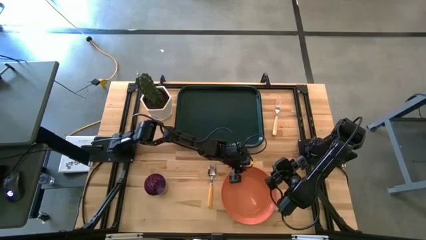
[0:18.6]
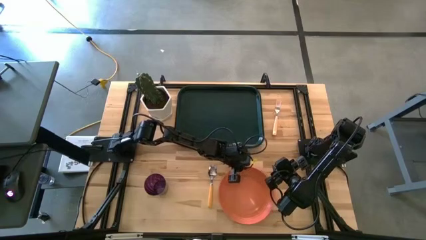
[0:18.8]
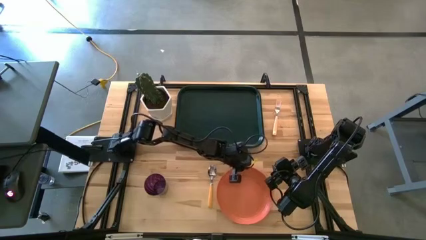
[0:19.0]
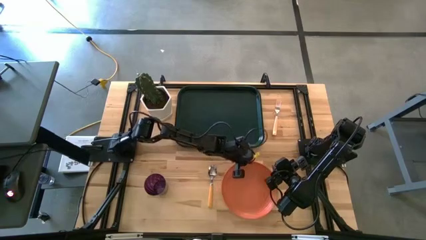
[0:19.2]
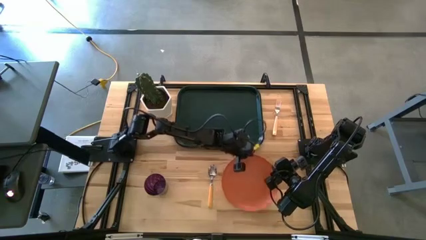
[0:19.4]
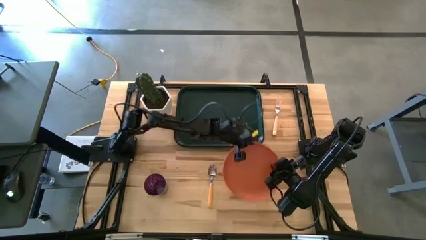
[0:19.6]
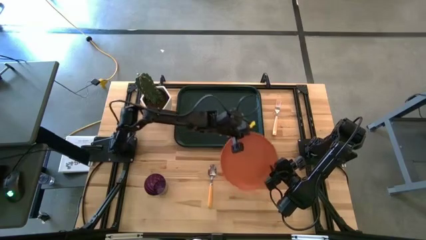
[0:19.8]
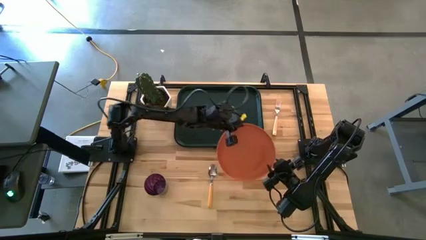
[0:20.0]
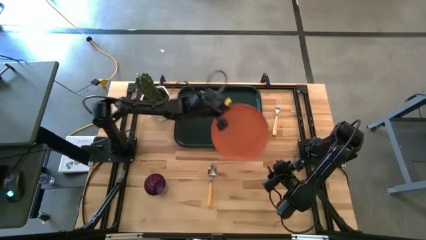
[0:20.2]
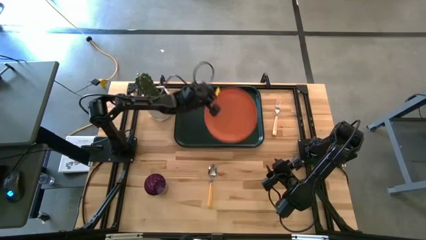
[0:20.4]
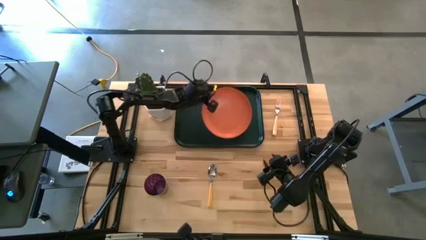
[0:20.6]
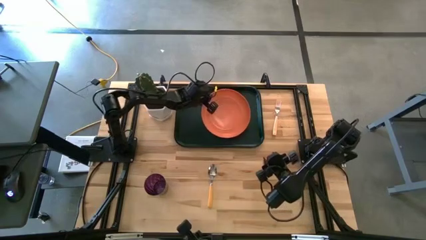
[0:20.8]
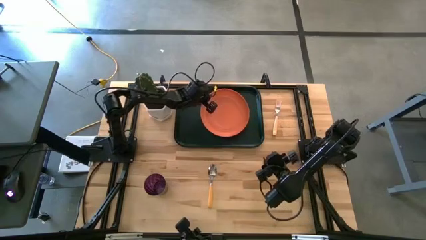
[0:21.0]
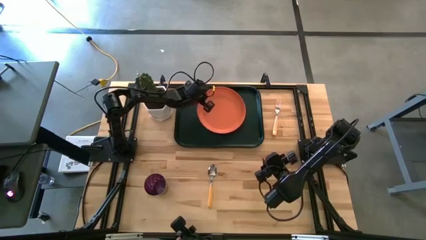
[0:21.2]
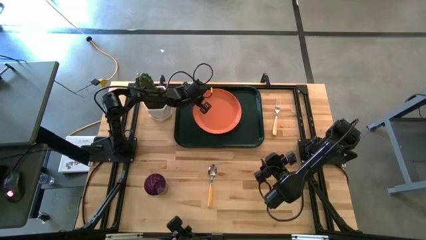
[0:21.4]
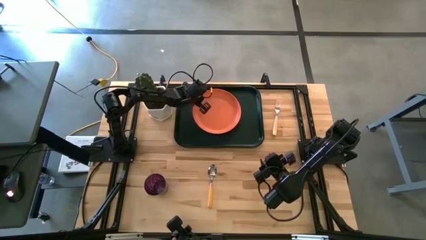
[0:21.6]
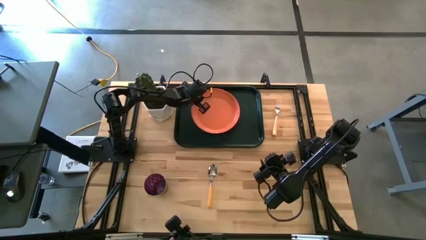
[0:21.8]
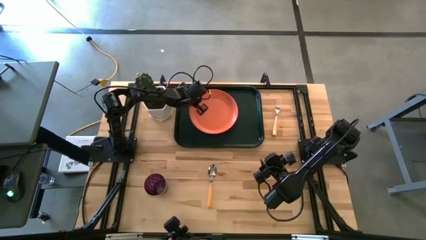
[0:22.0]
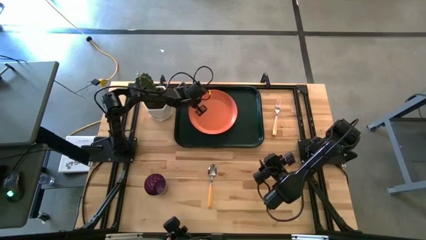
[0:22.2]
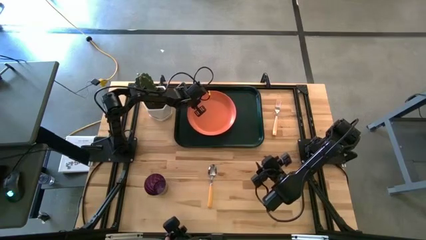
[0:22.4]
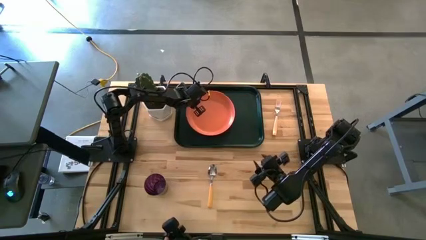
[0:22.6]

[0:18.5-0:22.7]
Task: Pick and place plate/cup/fork/spoon on tray
Put the orange plate on the dark green tray

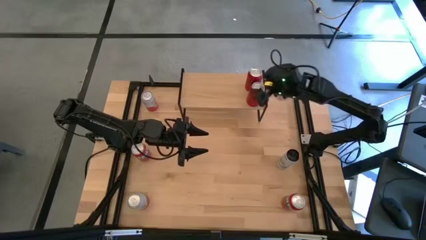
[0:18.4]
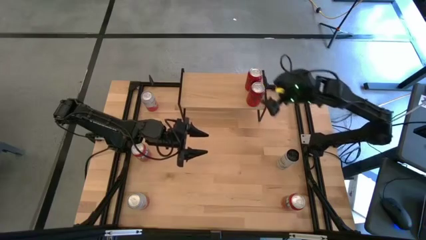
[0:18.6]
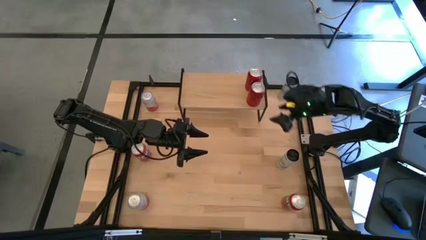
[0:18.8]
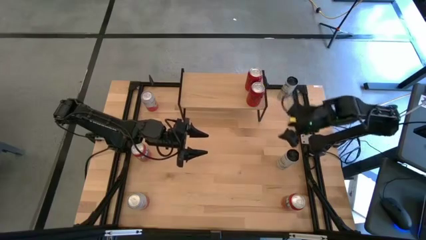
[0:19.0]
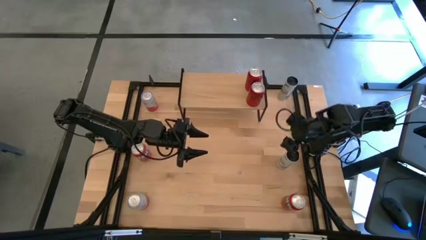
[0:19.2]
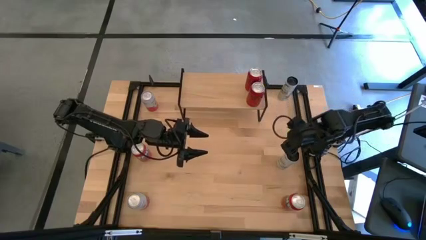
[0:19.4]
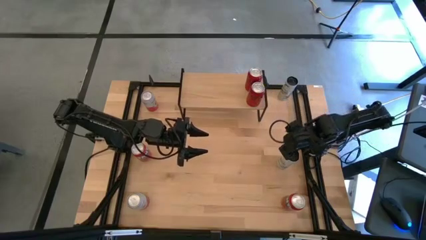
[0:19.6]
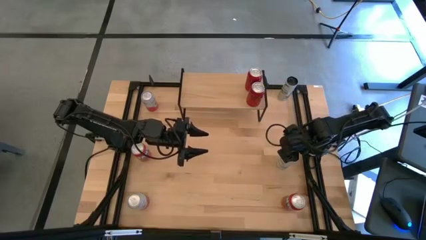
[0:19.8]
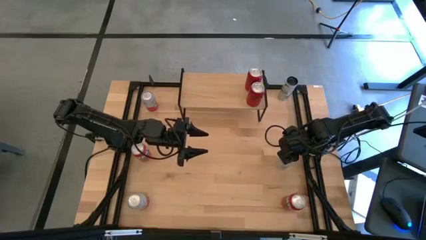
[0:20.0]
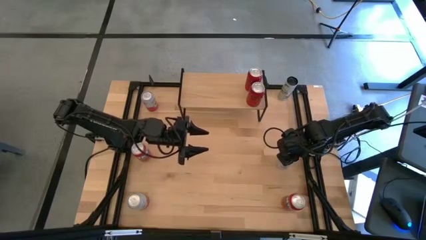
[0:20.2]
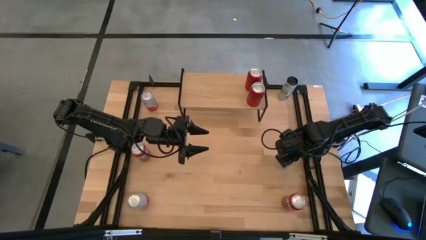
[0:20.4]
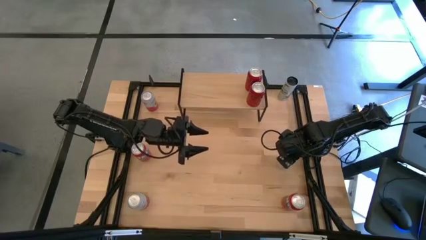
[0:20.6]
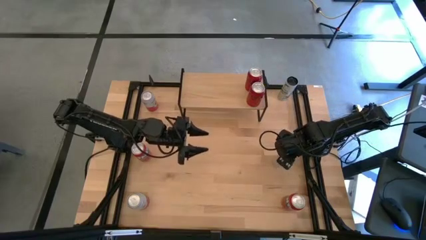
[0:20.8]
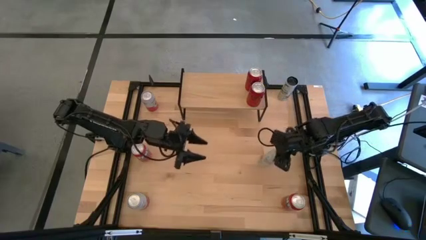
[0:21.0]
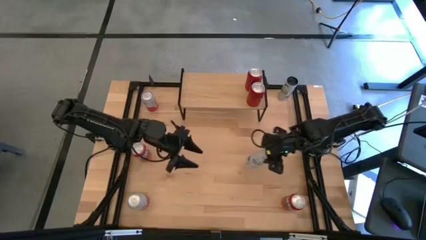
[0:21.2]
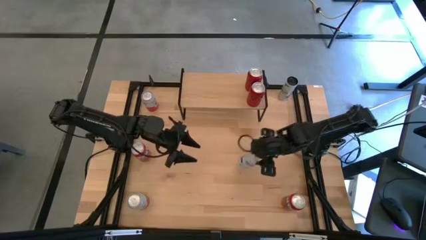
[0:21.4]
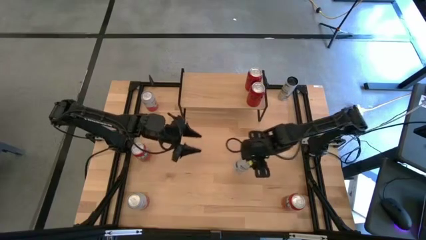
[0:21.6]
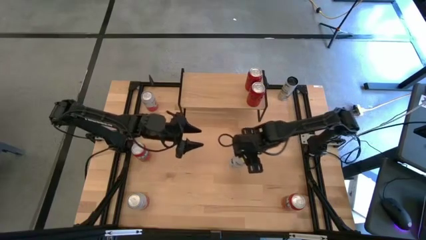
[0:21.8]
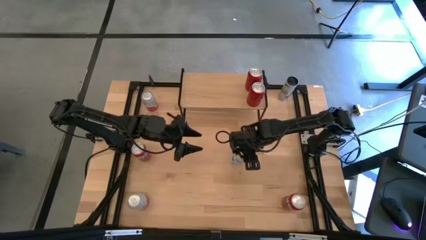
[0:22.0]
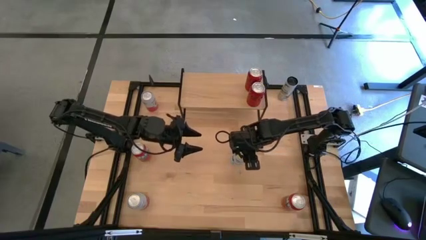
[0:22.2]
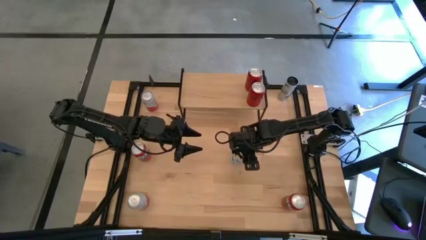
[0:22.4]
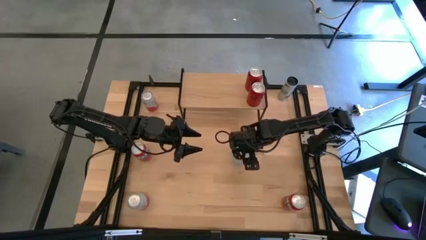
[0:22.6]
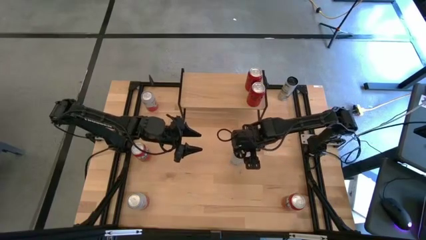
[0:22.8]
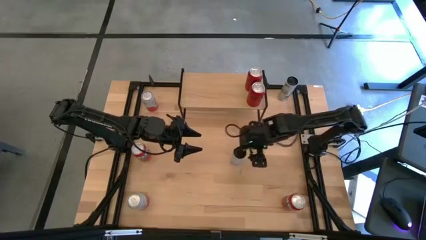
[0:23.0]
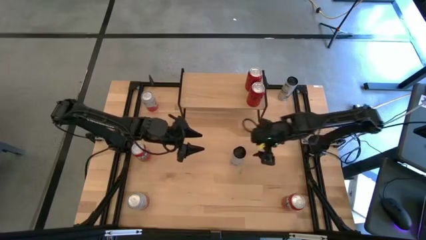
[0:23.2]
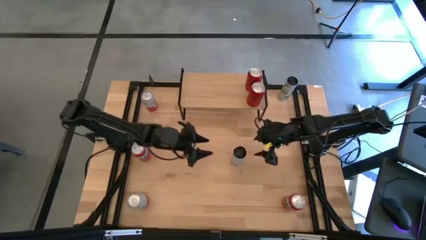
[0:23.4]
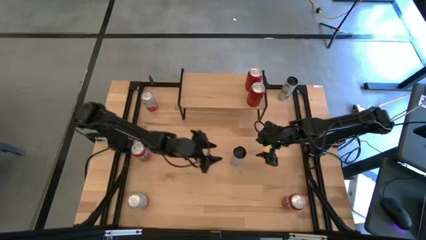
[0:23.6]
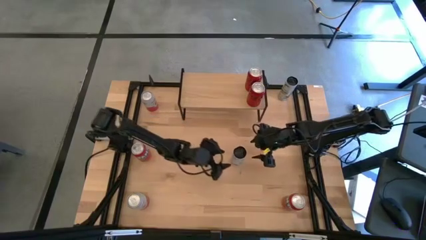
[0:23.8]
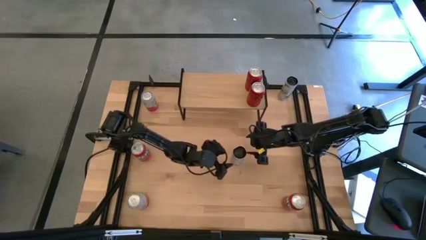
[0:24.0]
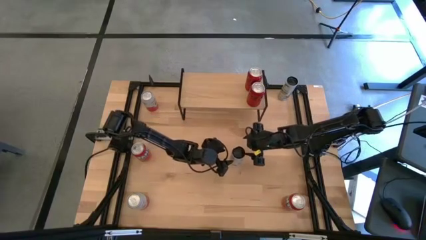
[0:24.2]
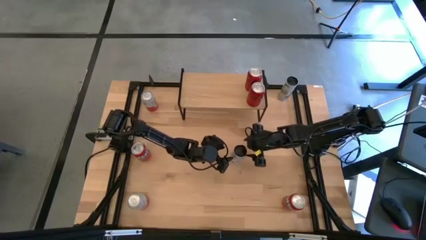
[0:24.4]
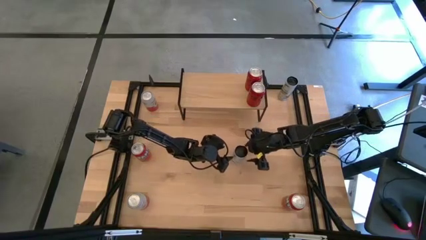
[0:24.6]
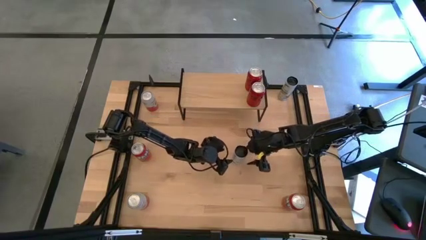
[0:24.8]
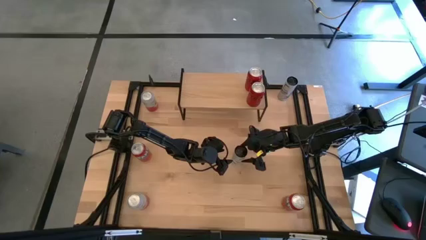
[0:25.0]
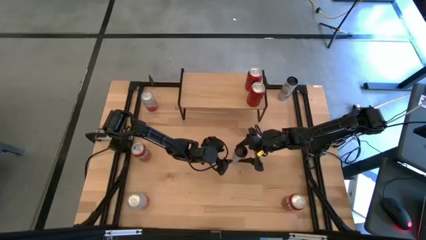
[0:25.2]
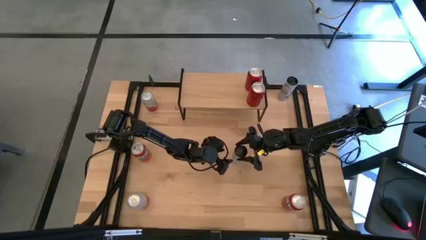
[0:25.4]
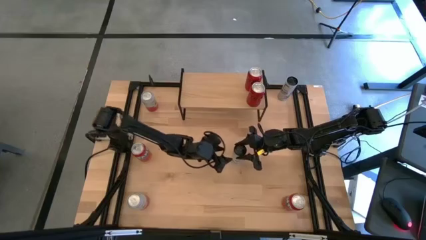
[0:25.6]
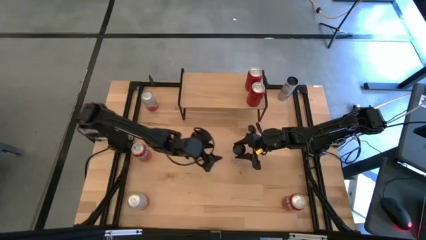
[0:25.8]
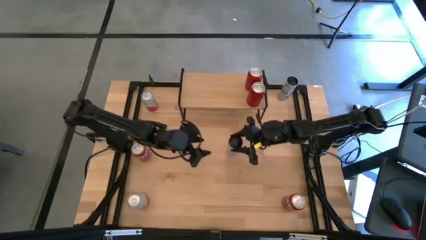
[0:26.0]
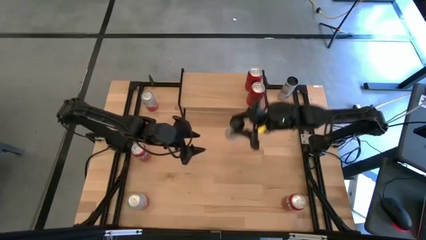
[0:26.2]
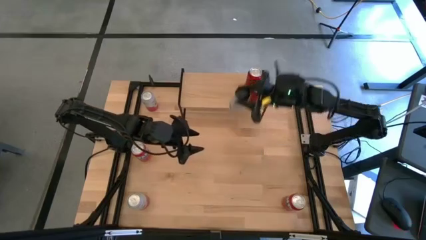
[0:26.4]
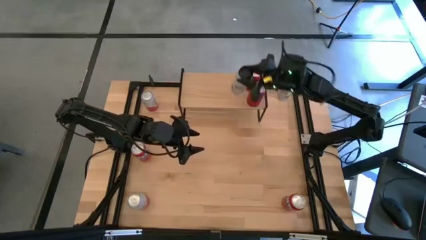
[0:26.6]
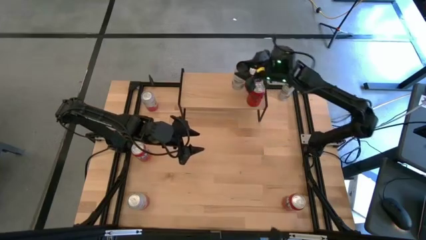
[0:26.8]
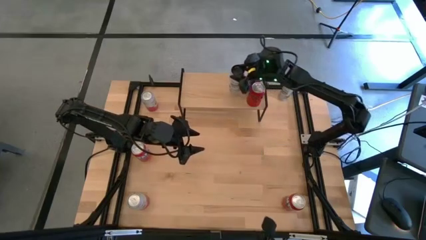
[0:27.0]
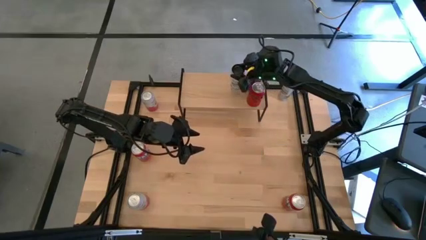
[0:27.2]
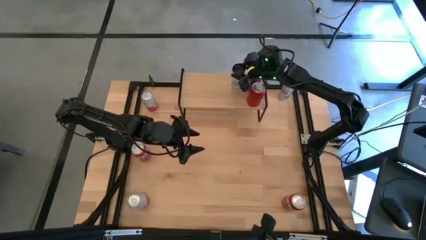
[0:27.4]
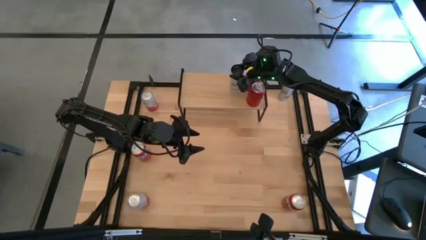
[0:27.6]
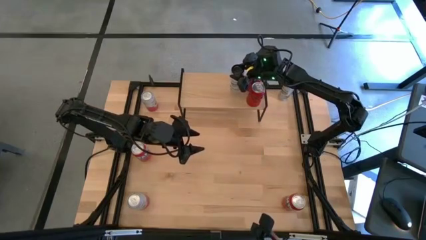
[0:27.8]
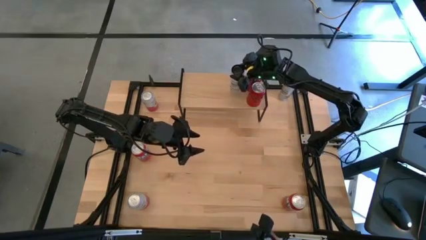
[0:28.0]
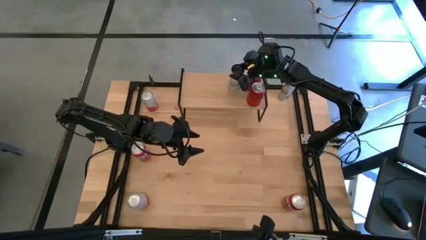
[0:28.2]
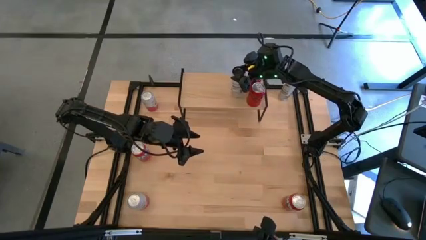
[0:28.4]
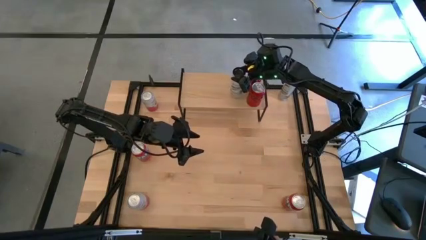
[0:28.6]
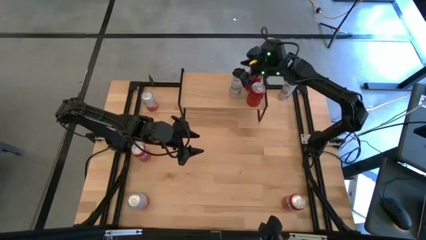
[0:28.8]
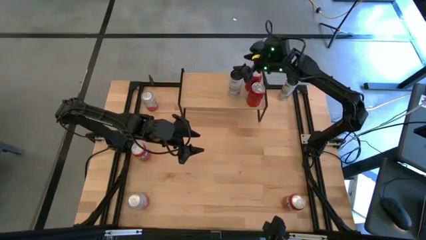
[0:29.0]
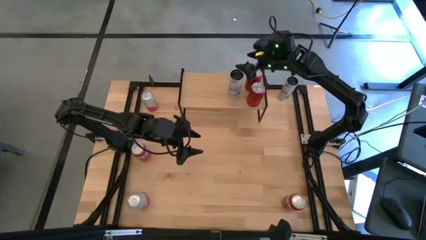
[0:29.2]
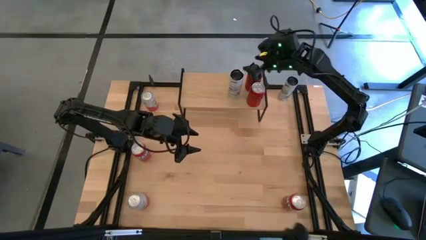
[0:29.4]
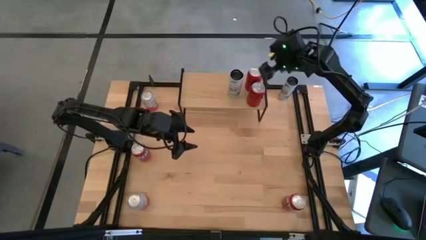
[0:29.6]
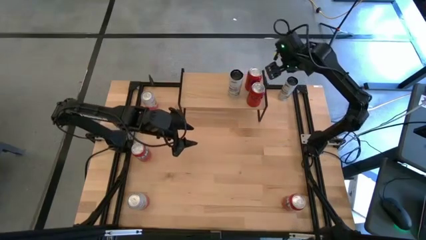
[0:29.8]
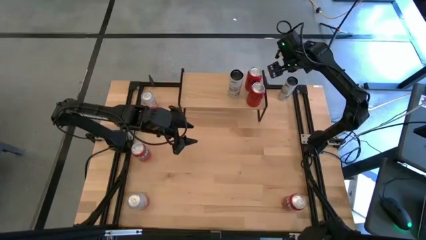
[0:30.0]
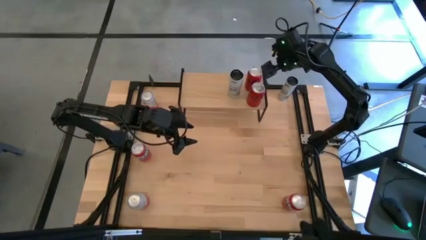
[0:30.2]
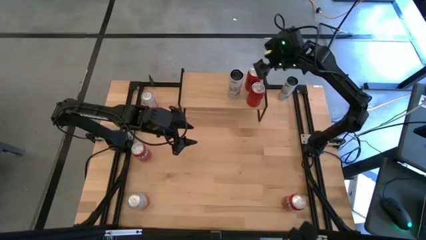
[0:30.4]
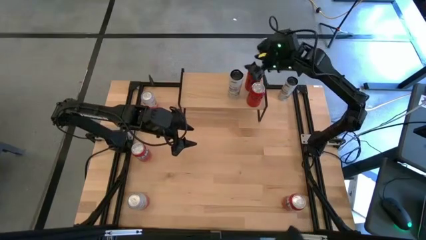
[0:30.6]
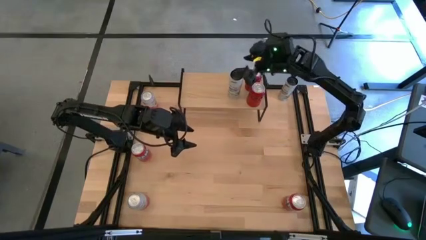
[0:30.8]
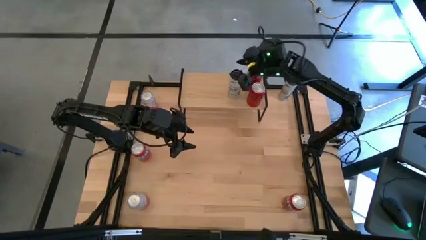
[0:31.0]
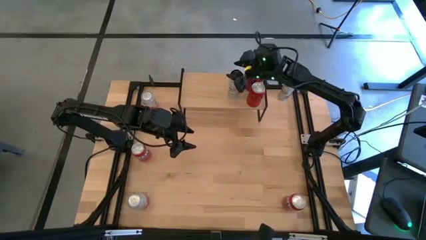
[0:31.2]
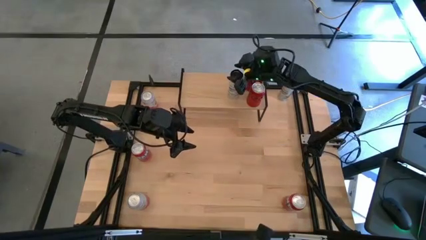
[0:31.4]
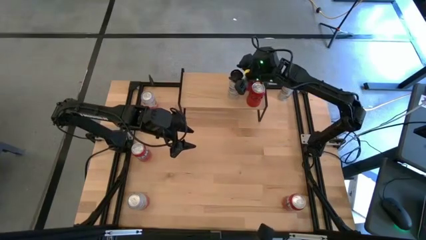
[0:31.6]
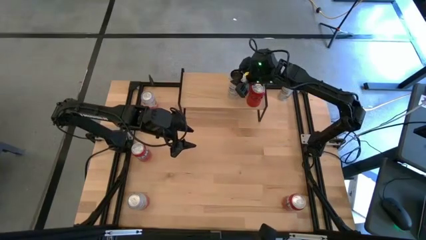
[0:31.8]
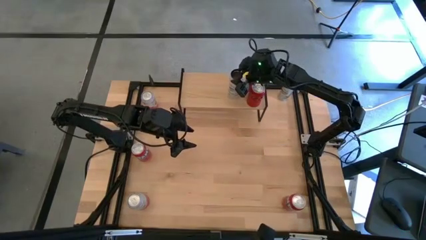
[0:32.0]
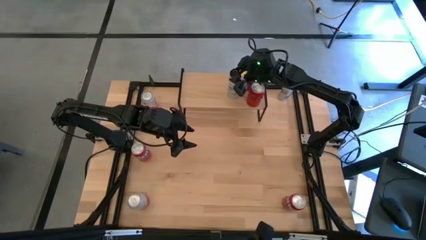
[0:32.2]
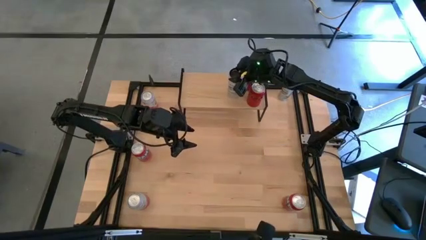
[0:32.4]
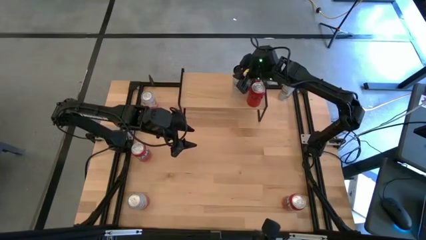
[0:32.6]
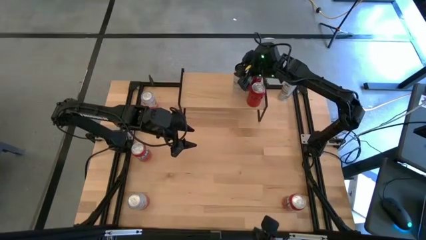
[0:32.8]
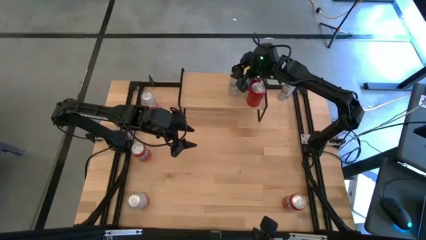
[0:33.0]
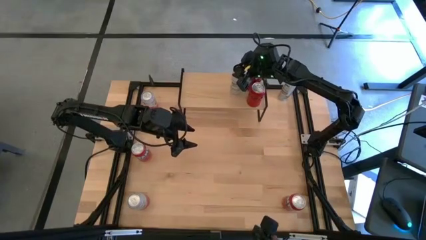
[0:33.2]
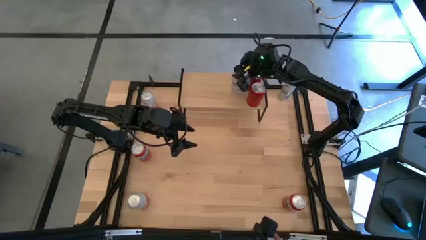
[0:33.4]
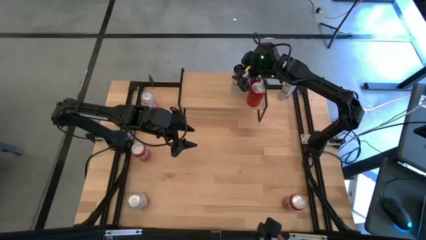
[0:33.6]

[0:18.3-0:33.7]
Task: Place canned beverage on shelf
Put the bottom white and blue soda can on the shelf
